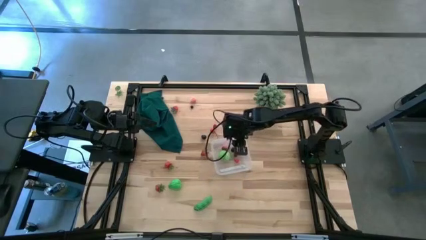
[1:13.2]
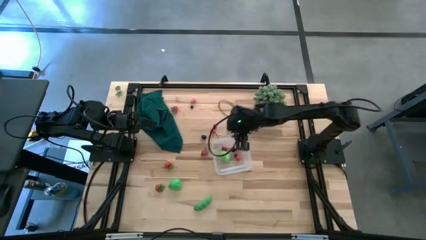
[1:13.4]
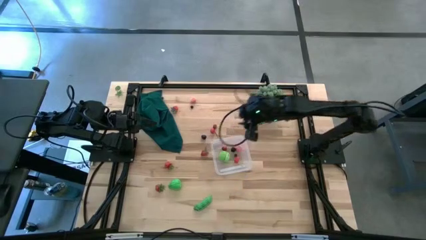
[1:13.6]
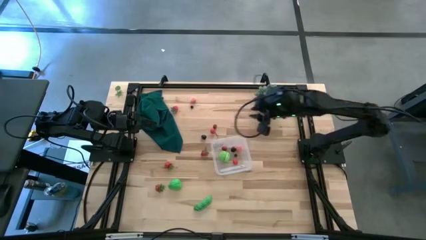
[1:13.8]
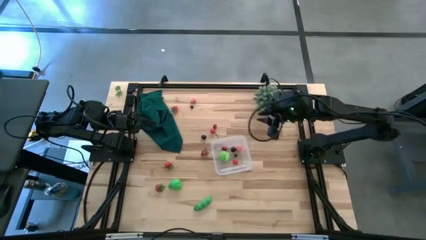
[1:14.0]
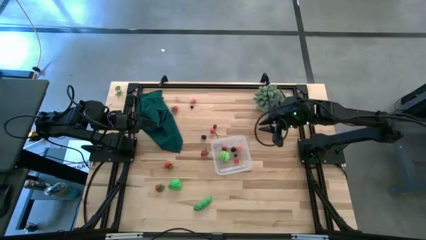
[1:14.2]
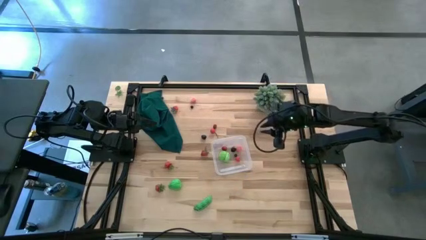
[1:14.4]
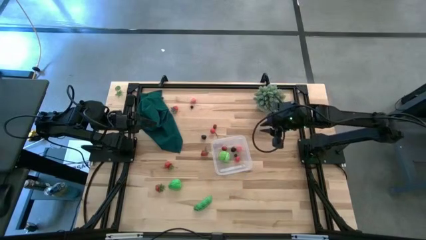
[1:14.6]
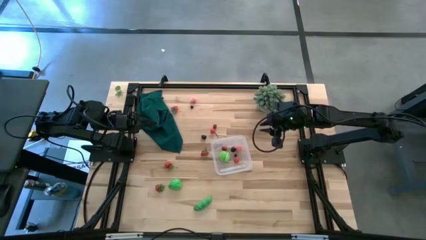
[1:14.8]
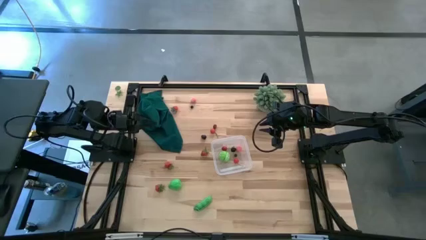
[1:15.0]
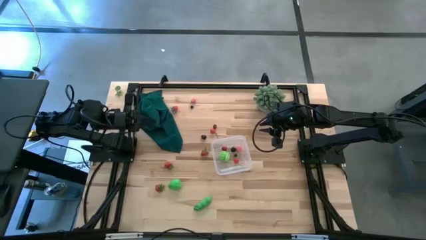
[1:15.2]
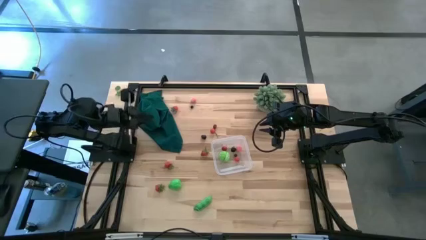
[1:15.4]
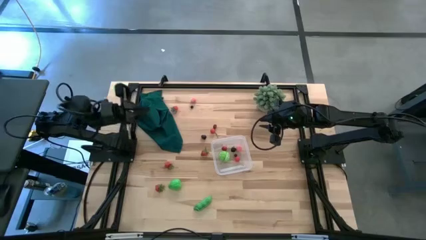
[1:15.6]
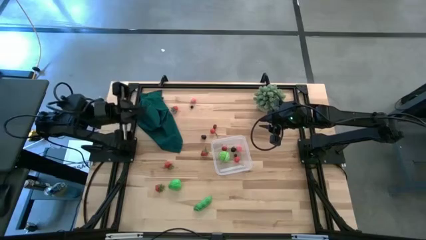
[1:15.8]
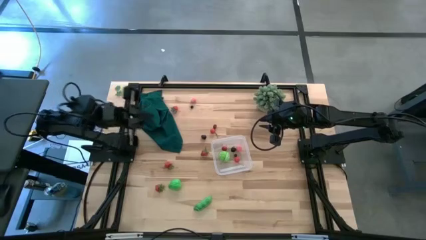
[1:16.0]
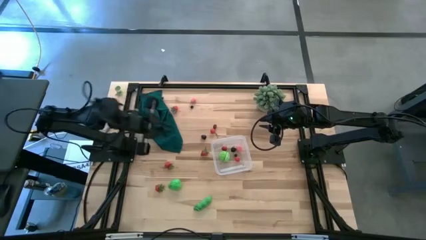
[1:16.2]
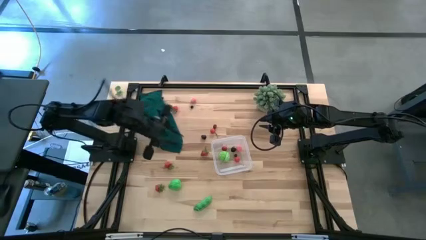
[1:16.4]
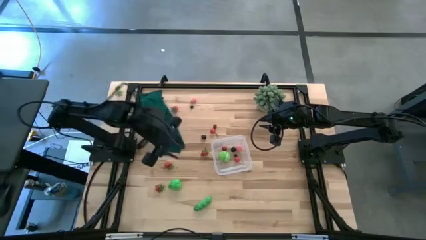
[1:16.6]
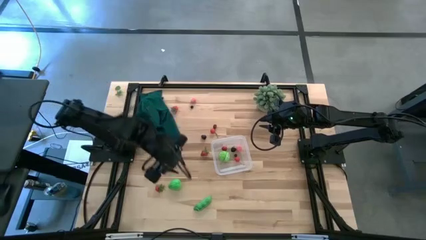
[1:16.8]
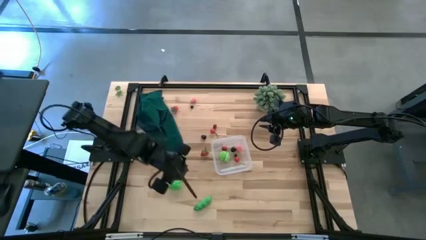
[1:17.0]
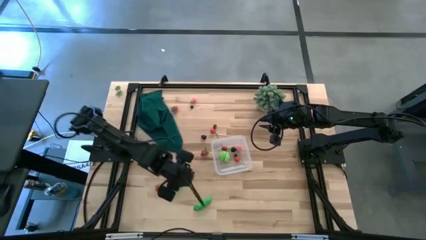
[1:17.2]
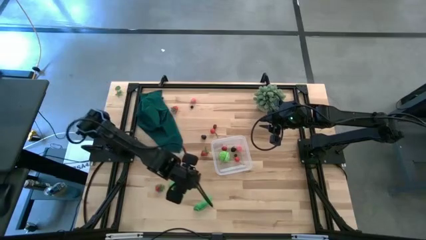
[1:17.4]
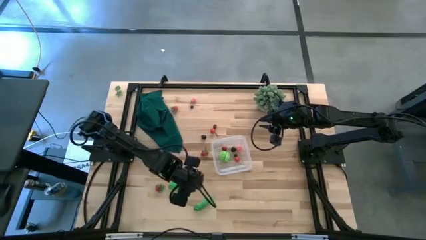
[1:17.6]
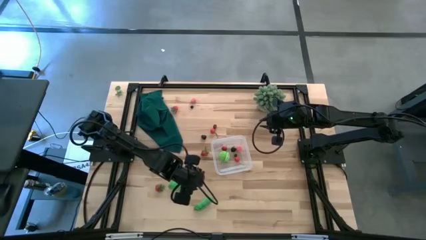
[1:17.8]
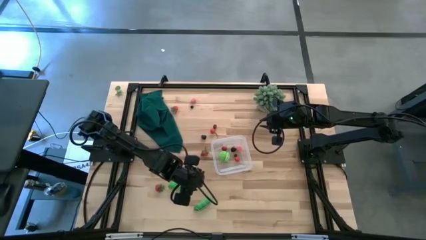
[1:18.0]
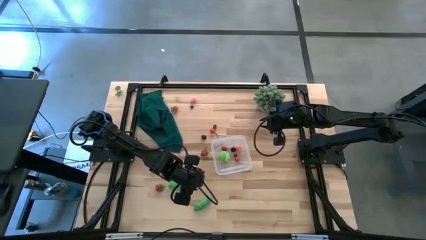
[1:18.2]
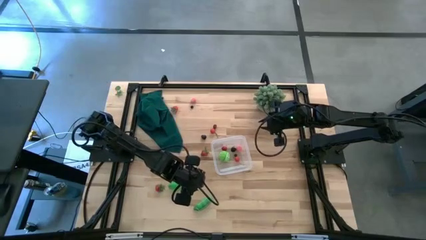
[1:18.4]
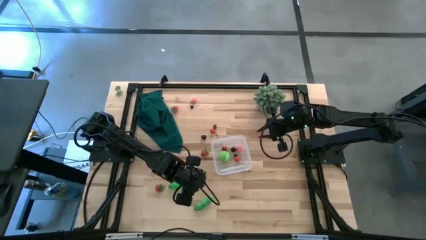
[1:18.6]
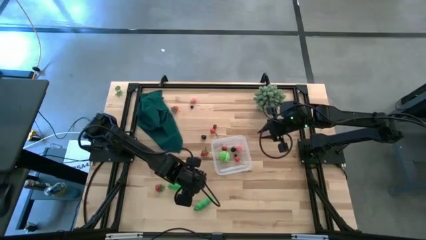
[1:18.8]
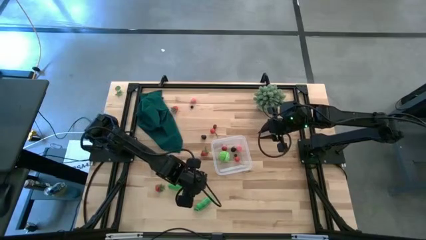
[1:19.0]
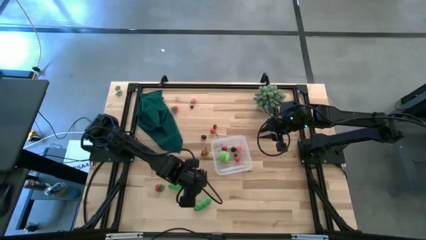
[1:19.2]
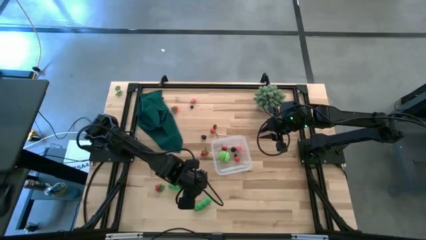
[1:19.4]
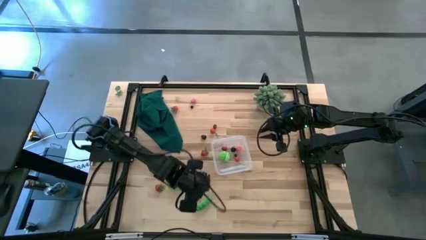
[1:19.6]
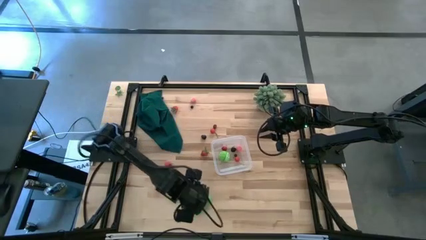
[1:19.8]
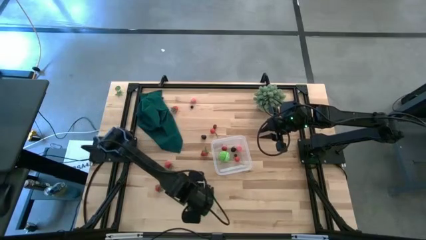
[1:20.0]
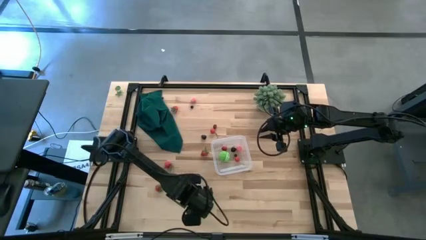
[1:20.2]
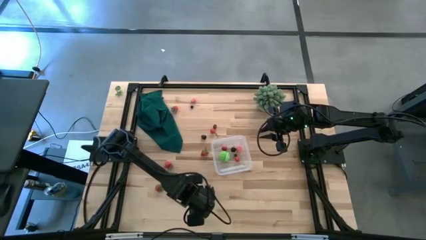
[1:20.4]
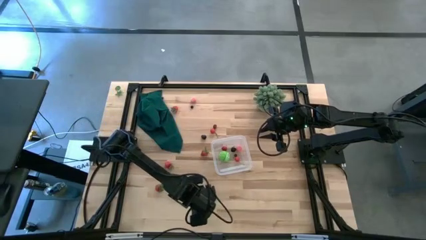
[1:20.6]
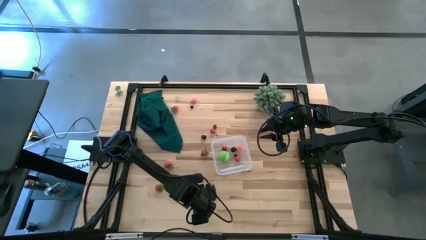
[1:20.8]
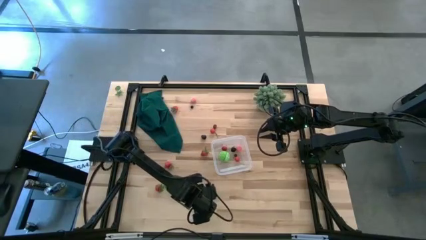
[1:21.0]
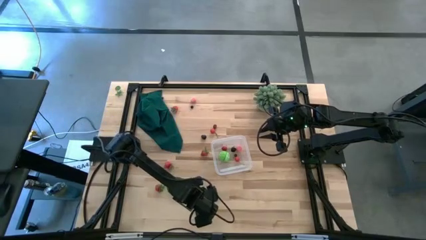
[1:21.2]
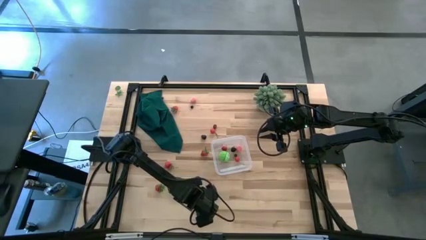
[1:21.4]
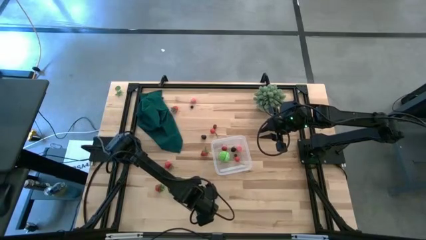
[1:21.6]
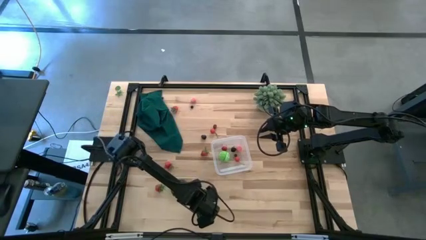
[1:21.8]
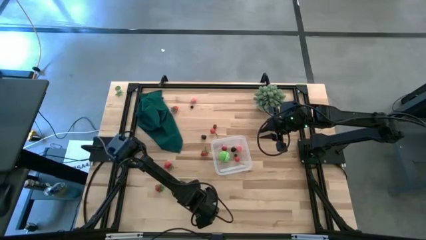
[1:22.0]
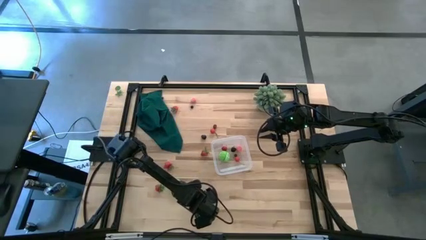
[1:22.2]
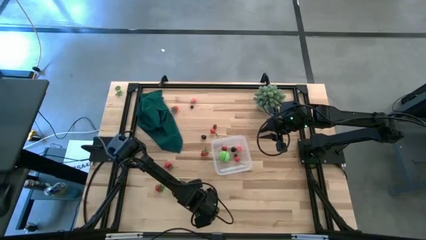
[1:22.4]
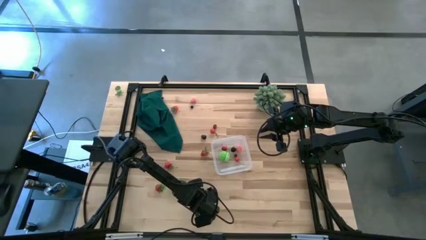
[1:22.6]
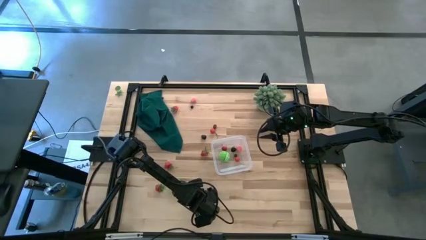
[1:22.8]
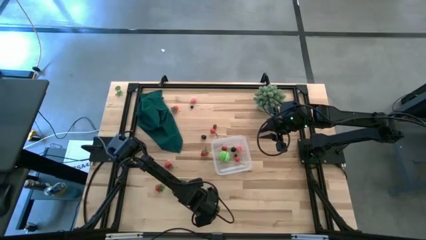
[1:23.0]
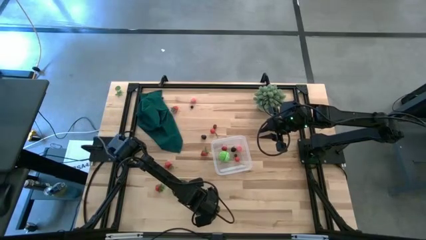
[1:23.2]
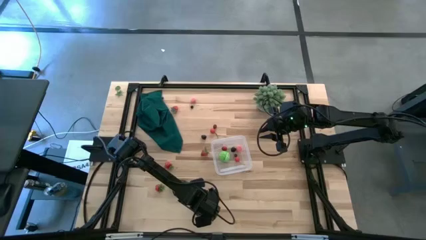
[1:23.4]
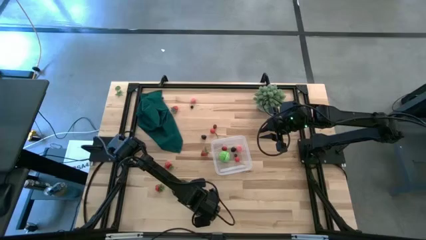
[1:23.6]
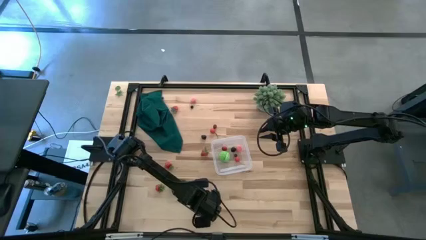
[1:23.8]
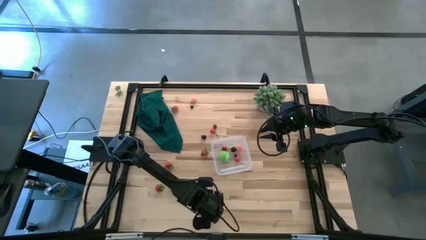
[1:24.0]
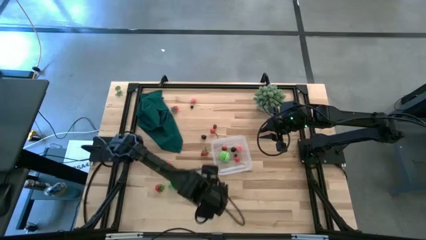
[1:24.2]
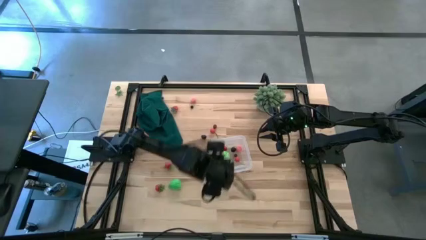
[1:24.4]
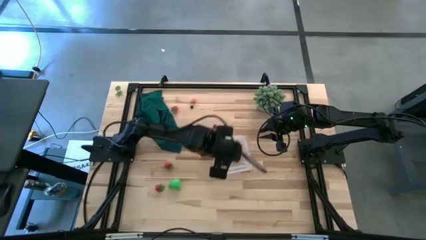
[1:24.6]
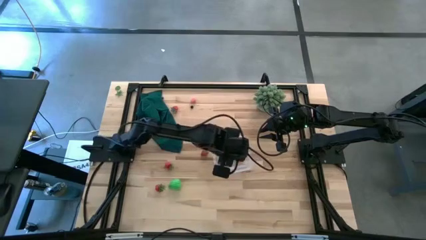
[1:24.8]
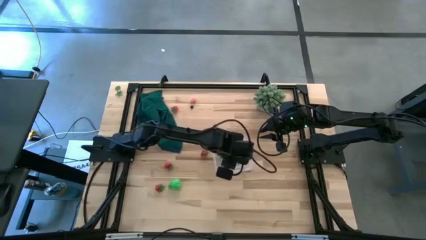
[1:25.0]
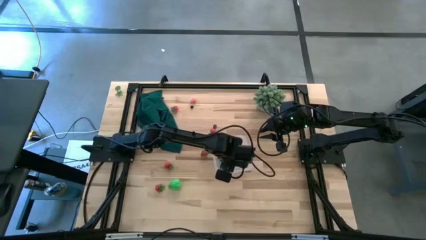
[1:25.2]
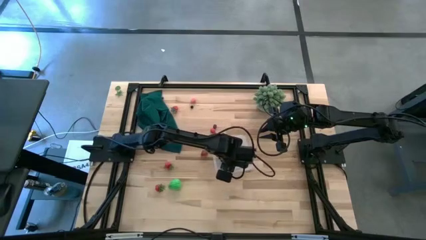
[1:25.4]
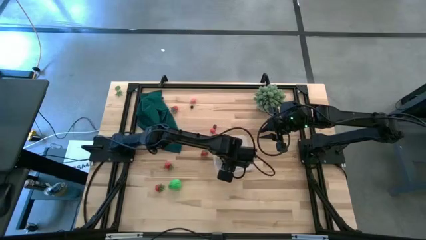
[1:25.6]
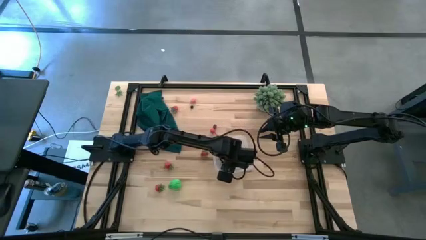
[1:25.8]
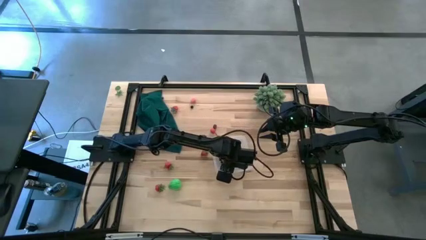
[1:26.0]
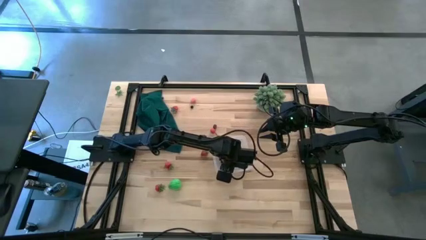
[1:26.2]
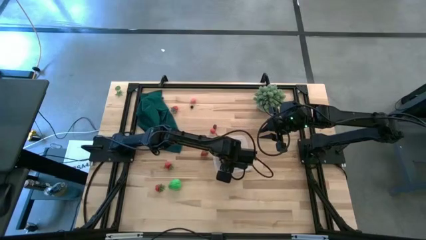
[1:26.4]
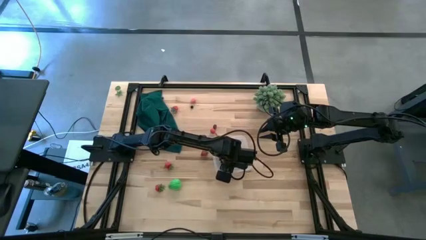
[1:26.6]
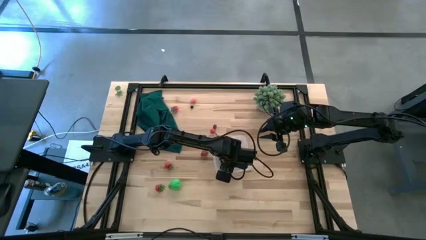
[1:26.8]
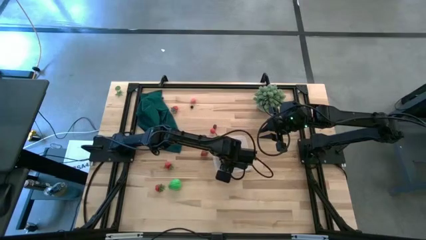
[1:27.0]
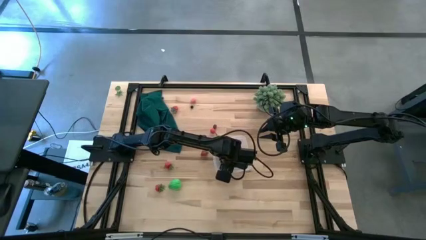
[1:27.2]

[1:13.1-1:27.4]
Task: Pick and placing Produce into tupperware
Put the green peas into the container
